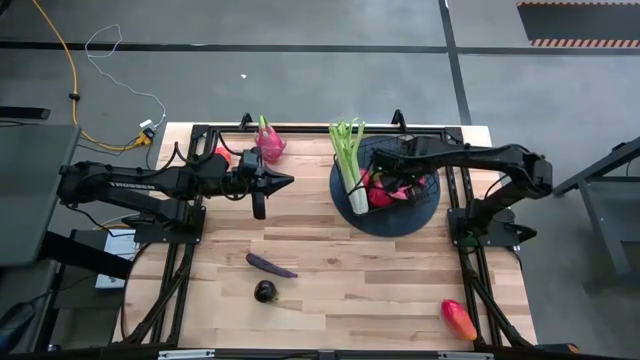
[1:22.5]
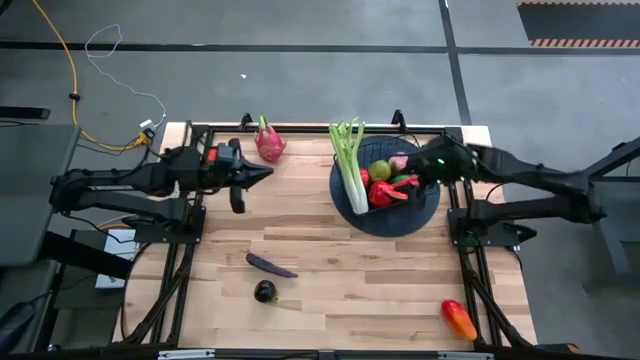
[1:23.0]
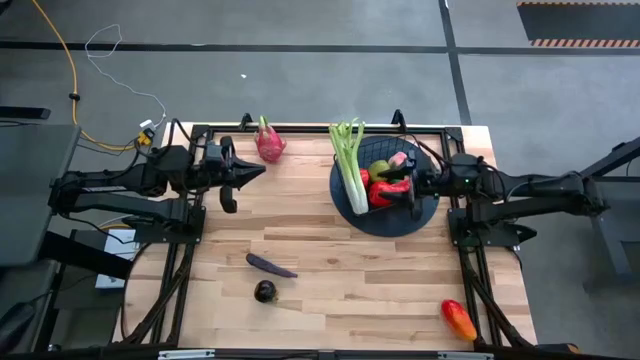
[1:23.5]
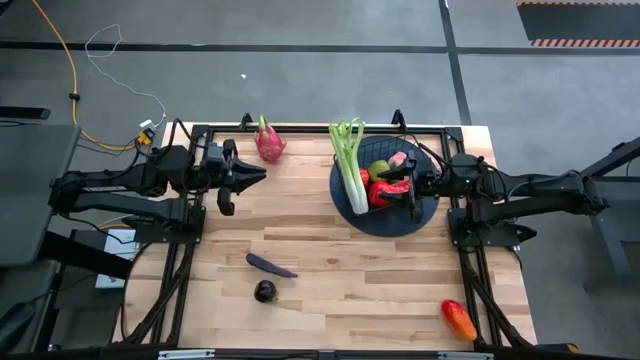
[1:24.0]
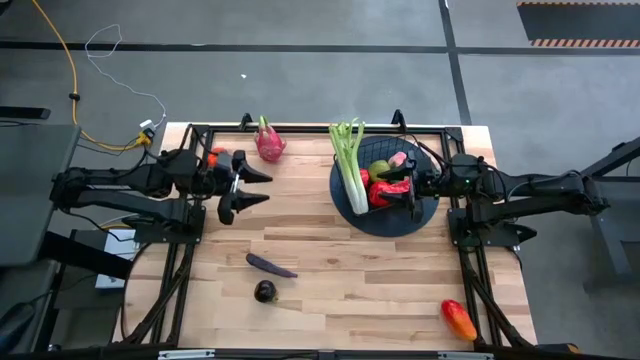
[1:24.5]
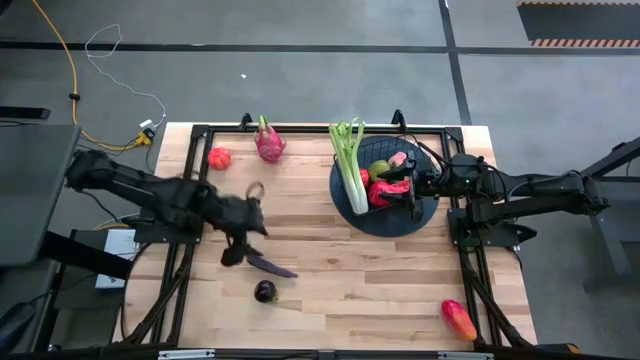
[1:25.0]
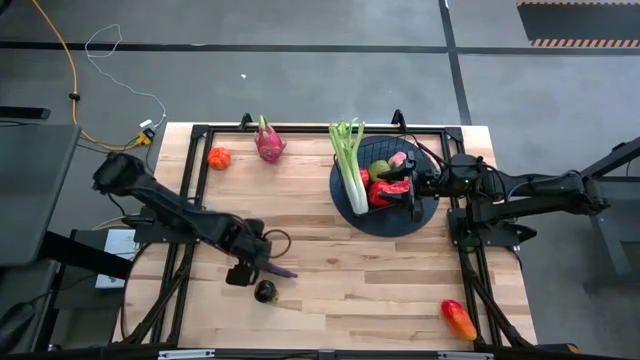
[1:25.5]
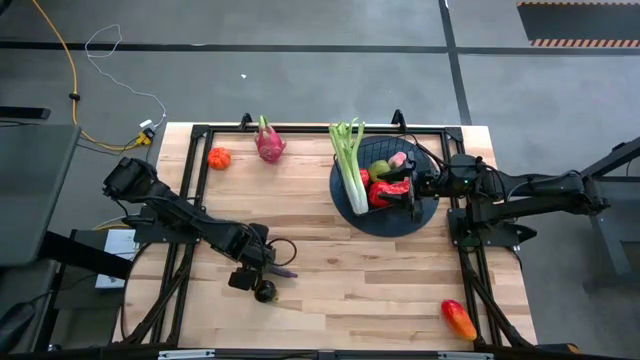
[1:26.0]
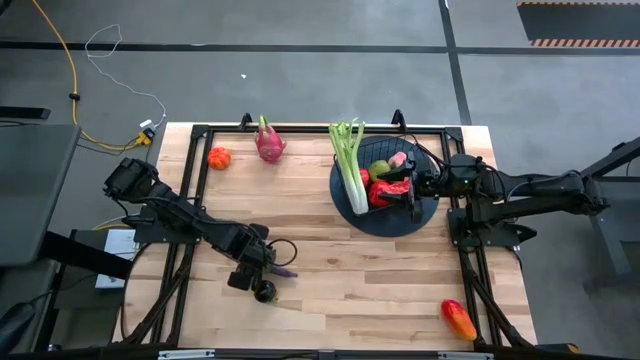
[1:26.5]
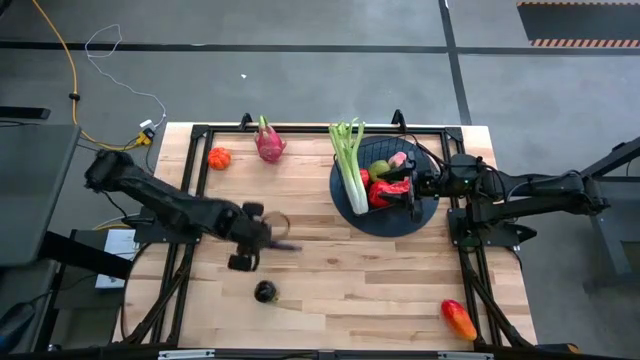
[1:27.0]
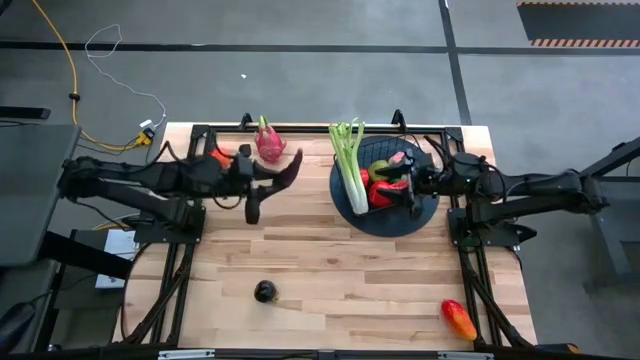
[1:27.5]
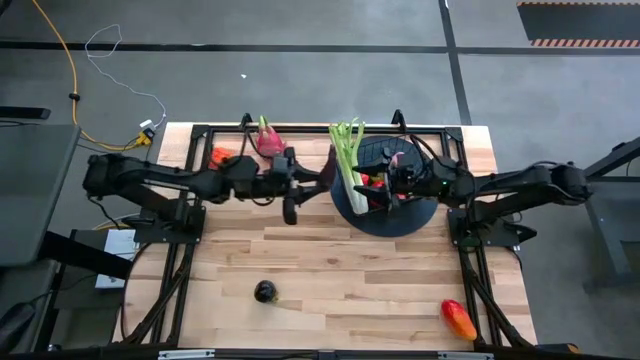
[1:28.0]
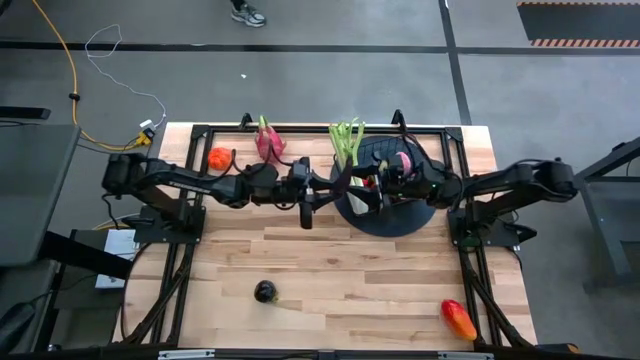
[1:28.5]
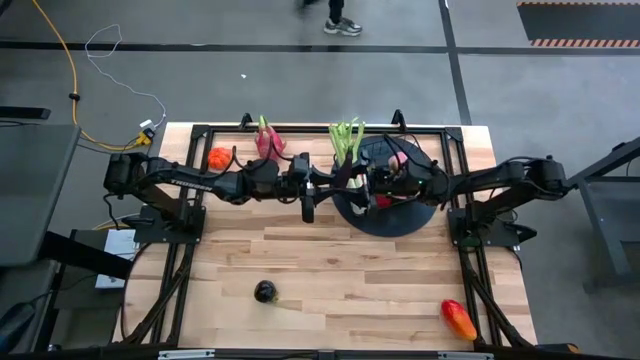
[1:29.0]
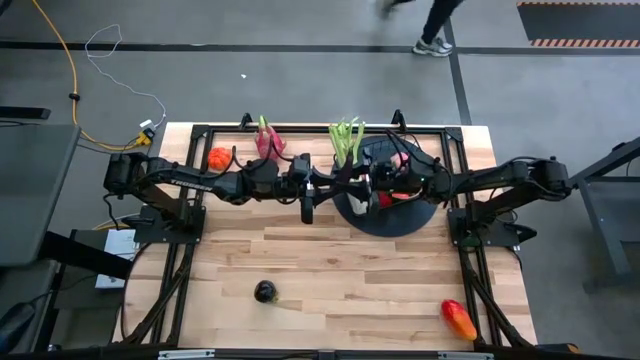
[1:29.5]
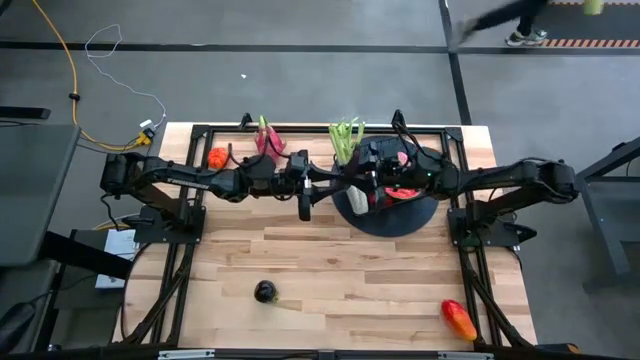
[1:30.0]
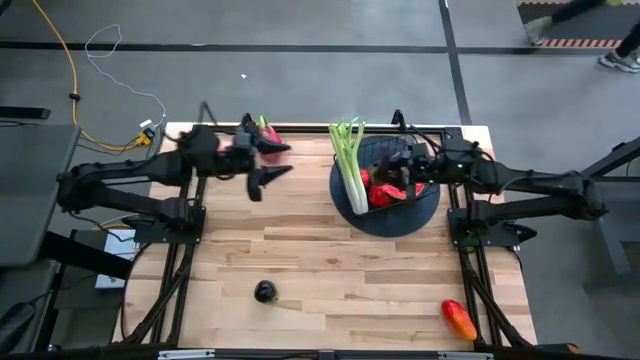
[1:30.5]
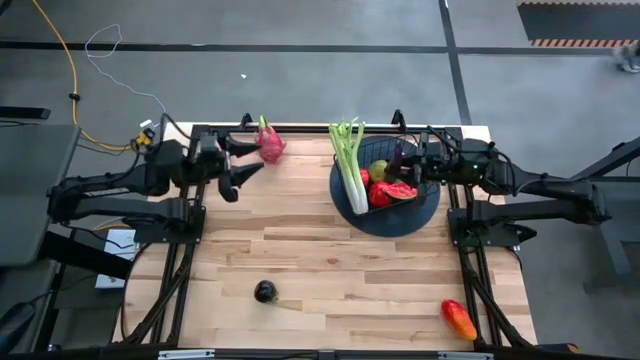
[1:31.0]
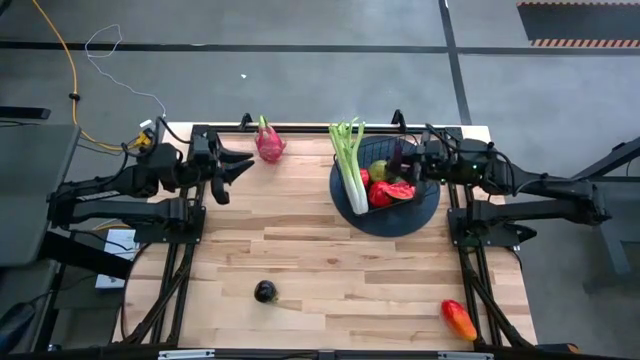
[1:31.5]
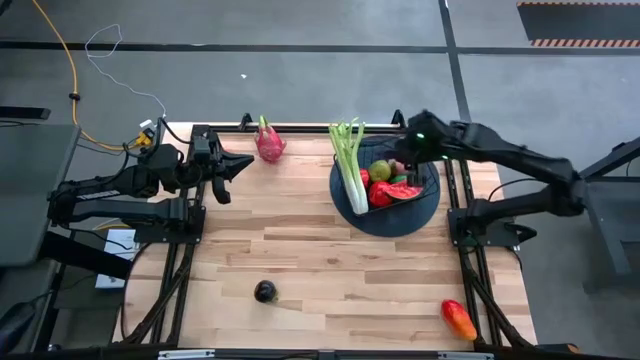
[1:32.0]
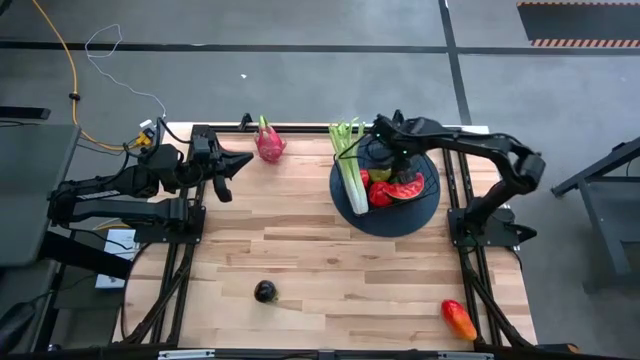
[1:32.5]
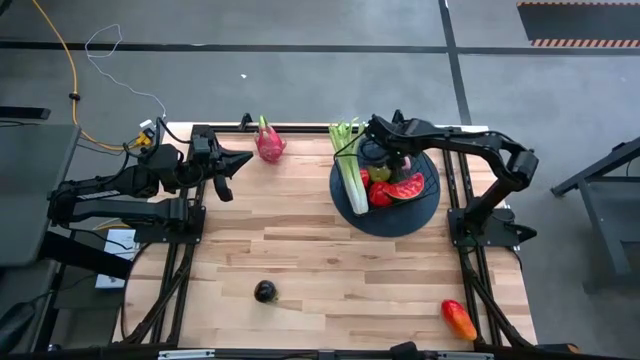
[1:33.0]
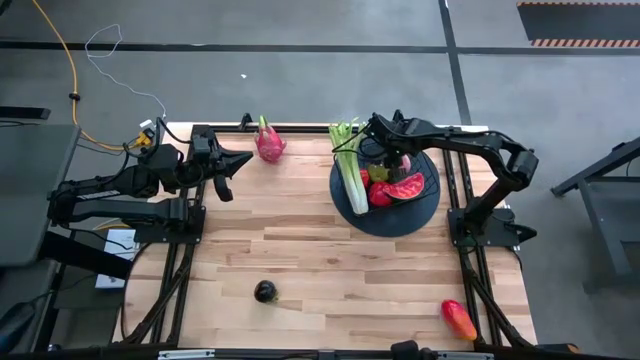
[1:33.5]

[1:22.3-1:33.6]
Task: Build produce basket
Put the eggplant into the wire basket

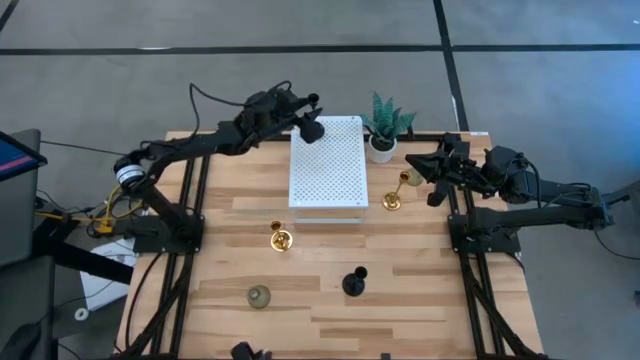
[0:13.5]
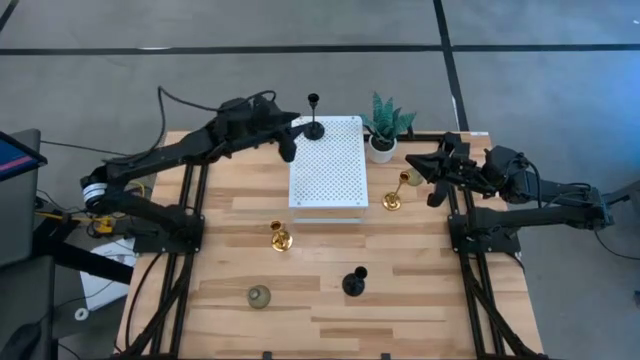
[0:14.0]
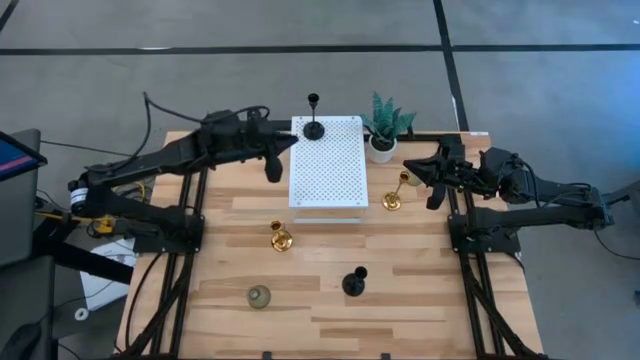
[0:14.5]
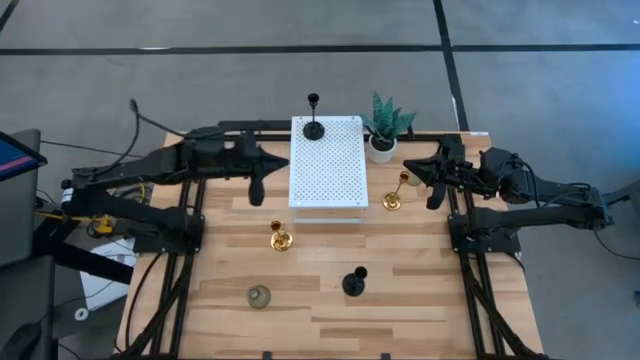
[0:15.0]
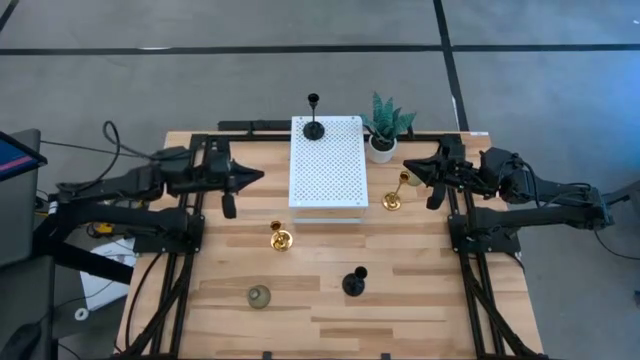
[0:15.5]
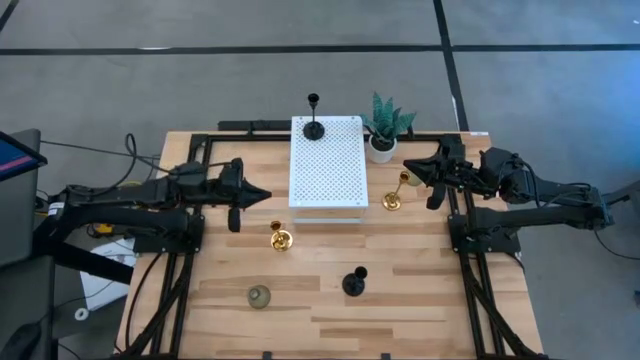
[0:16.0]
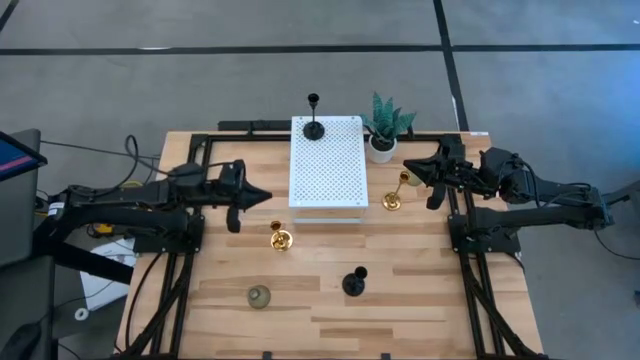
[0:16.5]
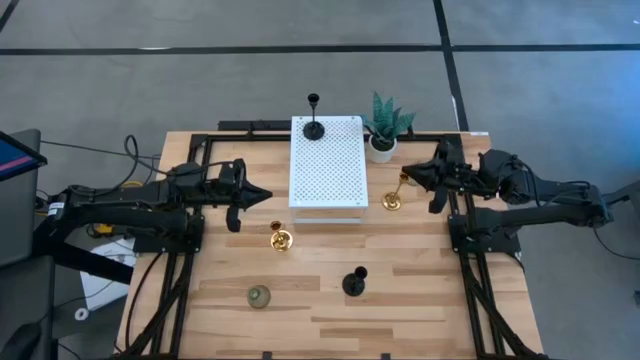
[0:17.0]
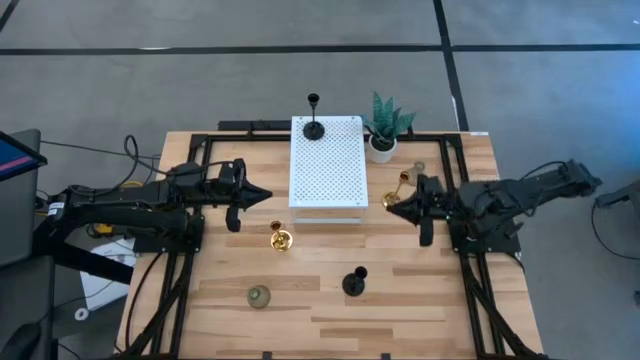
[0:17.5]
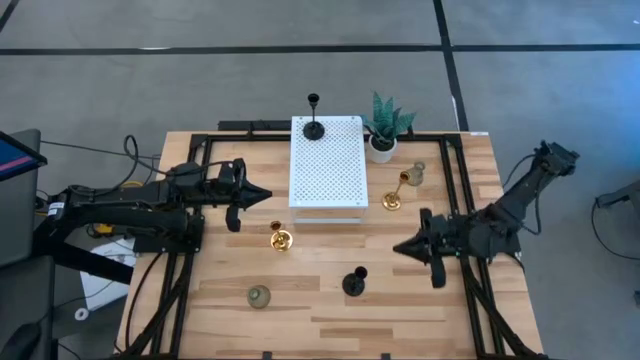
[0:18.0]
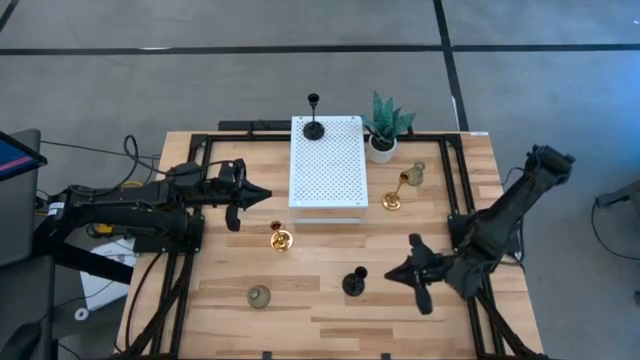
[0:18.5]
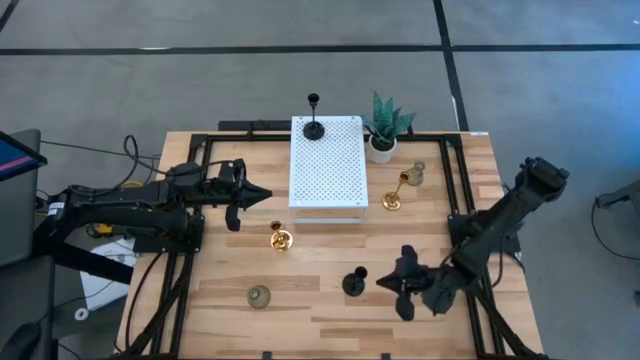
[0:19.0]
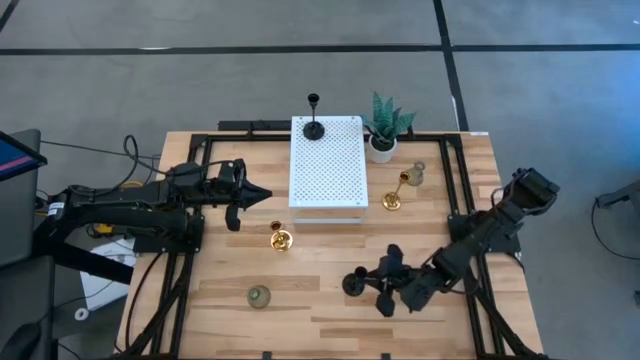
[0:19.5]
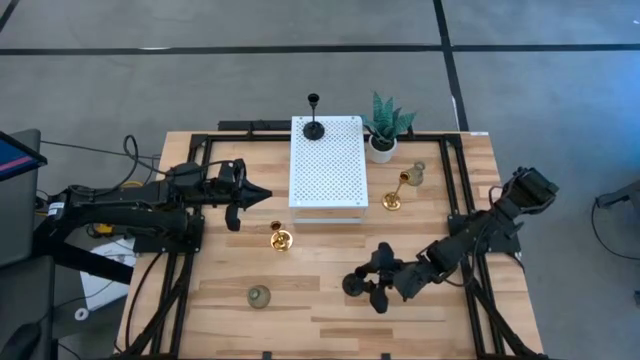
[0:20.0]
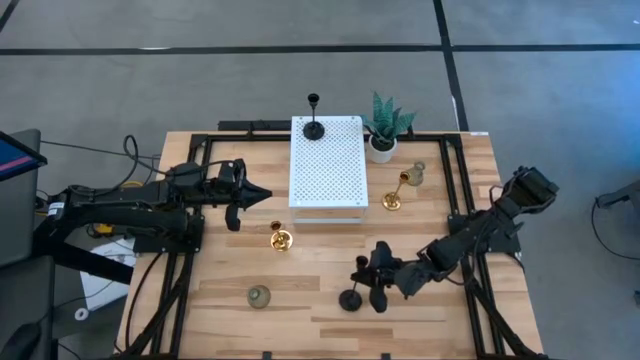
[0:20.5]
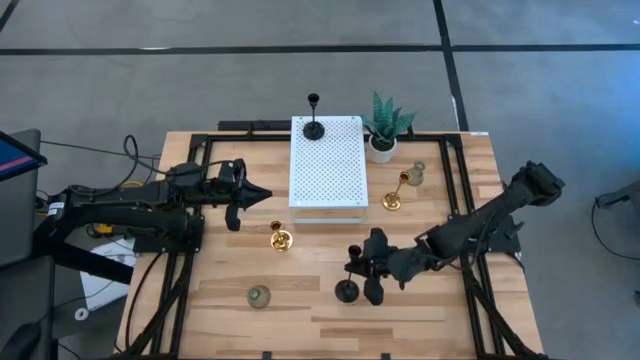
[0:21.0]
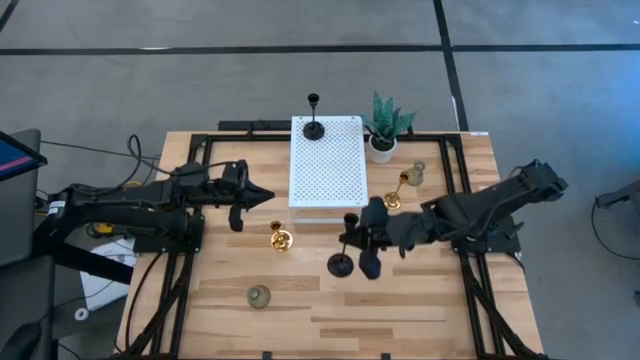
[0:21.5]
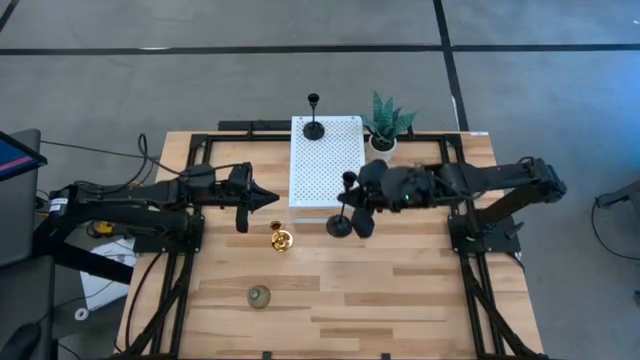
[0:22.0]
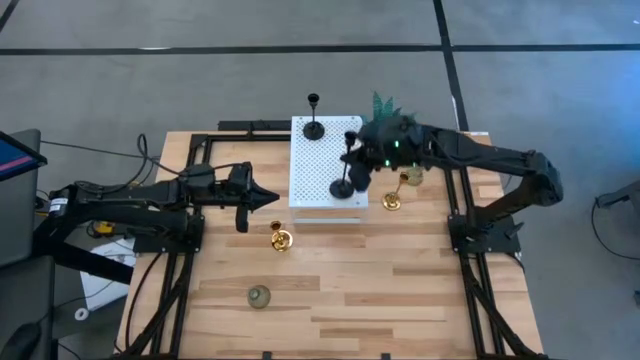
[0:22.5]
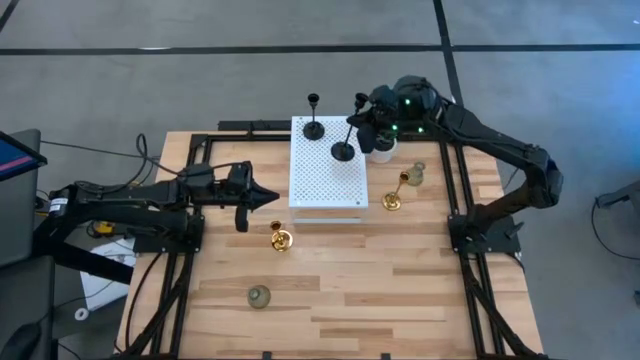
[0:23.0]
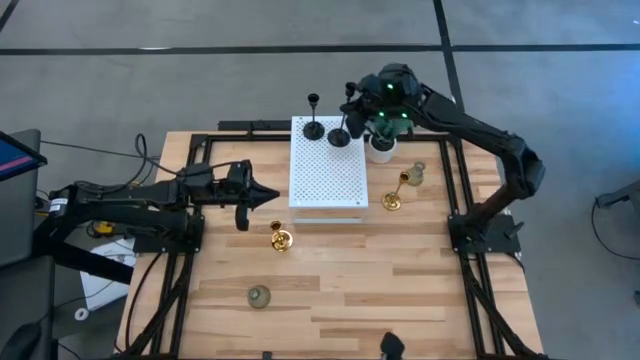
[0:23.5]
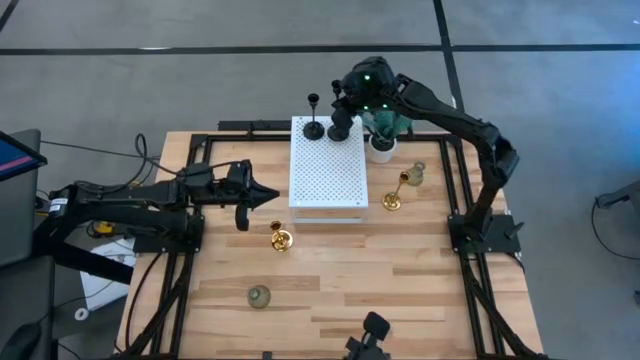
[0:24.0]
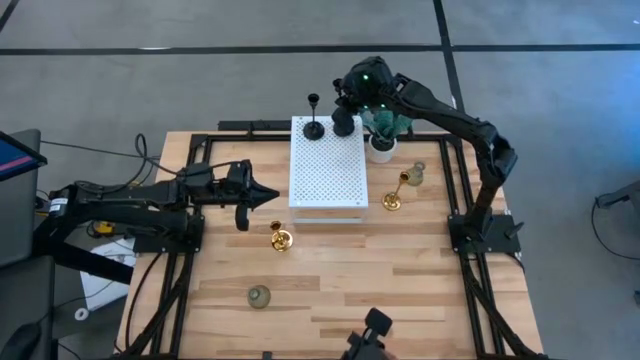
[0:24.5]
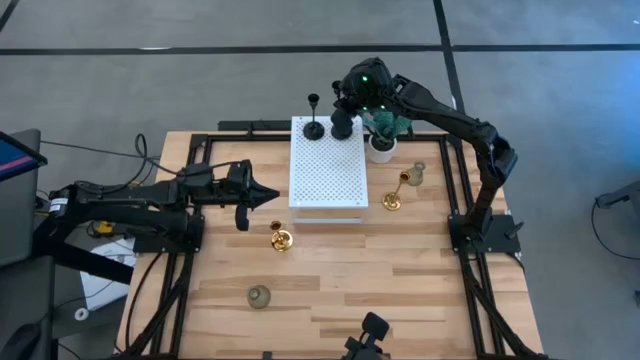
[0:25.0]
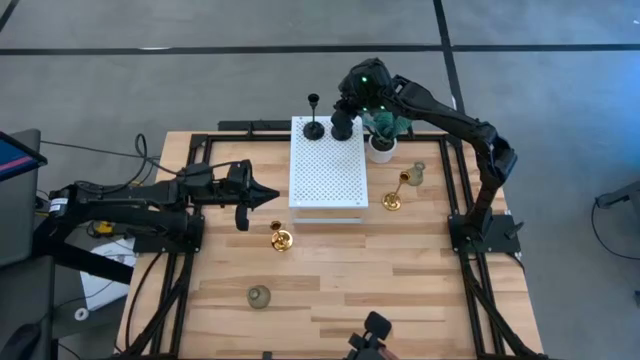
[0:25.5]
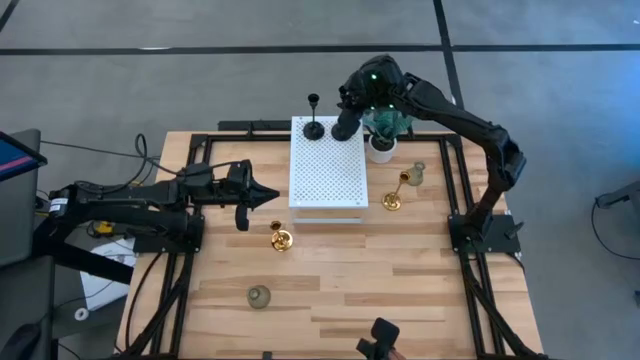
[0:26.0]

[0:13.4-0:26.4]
Task: Pick & Place candle stick holders
Align the black candle holder with the other black small candle holder on the shelf
